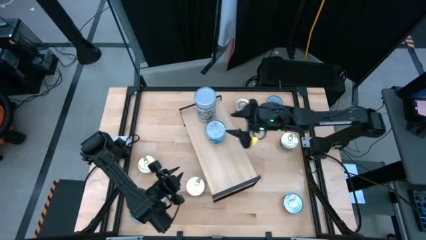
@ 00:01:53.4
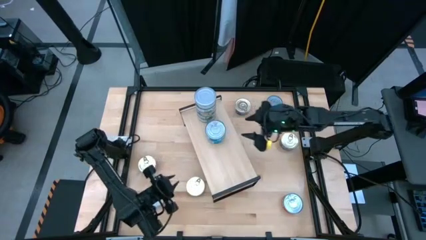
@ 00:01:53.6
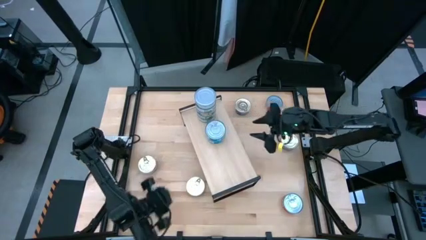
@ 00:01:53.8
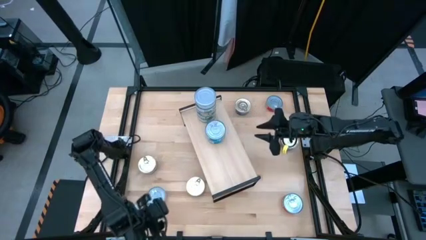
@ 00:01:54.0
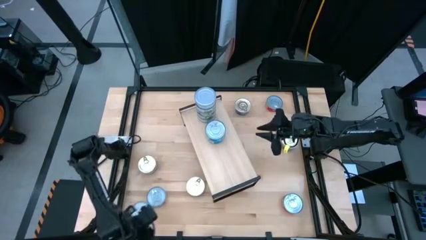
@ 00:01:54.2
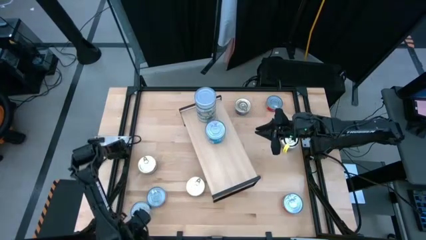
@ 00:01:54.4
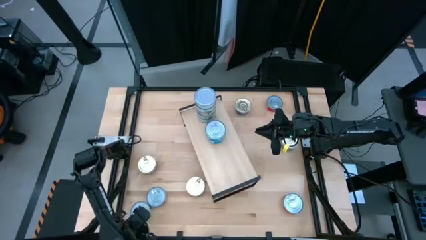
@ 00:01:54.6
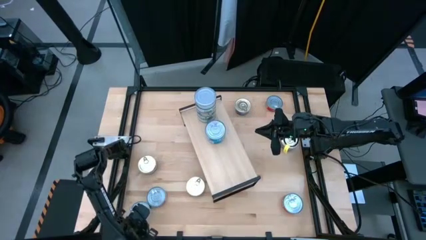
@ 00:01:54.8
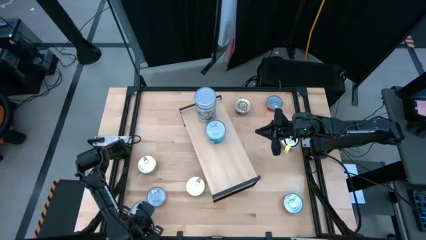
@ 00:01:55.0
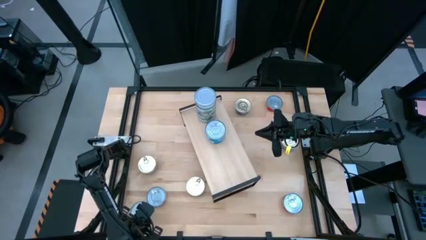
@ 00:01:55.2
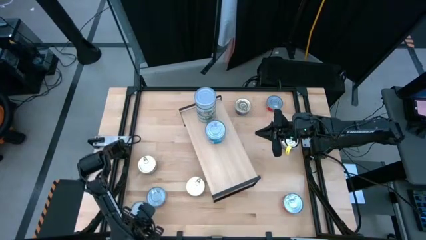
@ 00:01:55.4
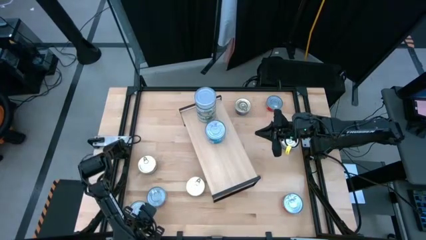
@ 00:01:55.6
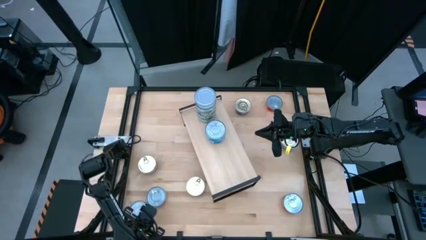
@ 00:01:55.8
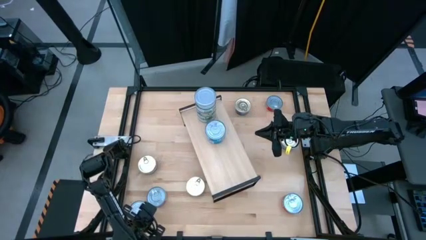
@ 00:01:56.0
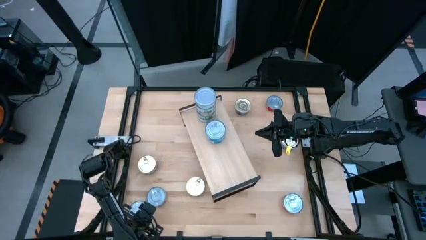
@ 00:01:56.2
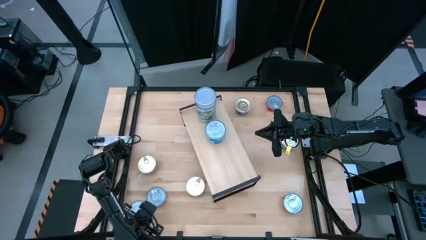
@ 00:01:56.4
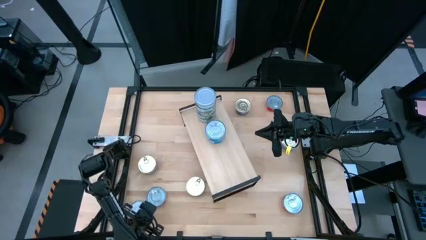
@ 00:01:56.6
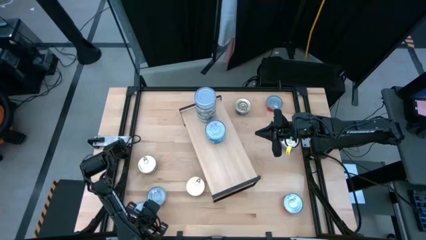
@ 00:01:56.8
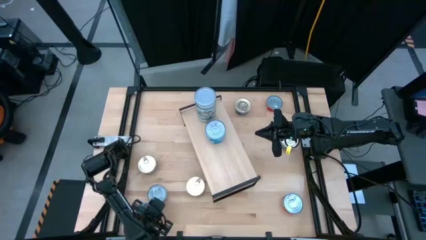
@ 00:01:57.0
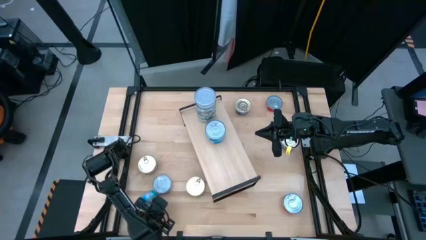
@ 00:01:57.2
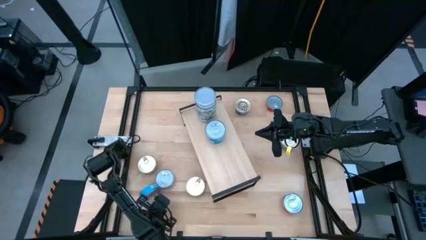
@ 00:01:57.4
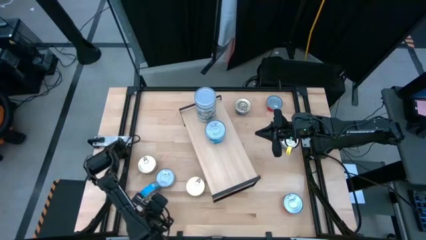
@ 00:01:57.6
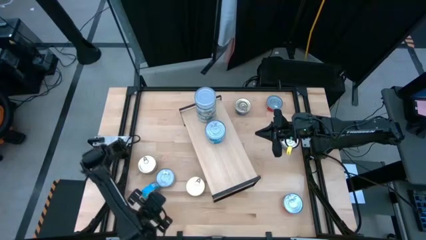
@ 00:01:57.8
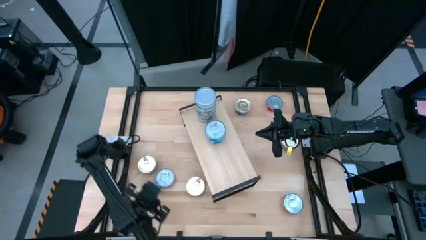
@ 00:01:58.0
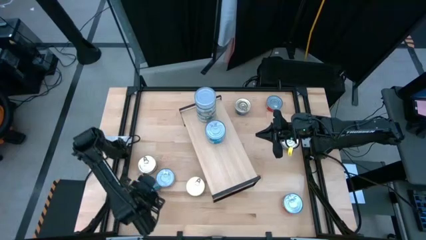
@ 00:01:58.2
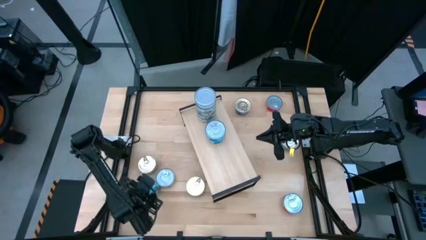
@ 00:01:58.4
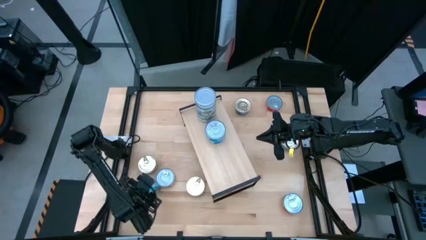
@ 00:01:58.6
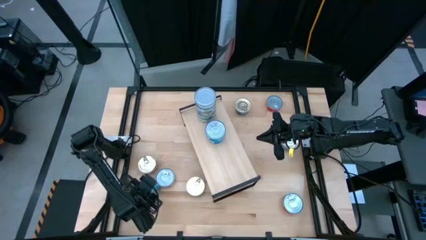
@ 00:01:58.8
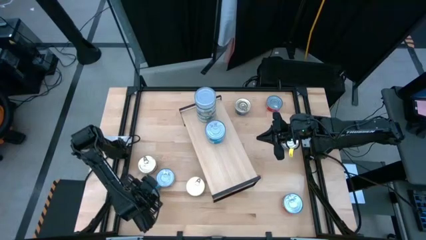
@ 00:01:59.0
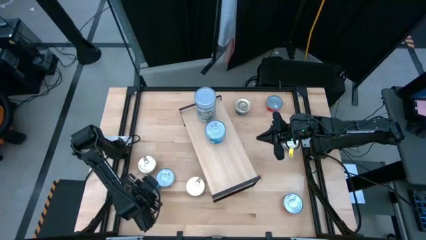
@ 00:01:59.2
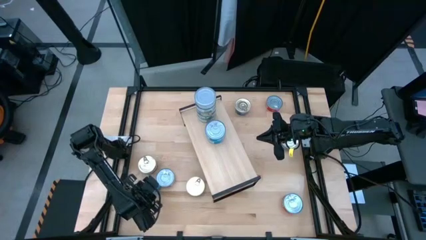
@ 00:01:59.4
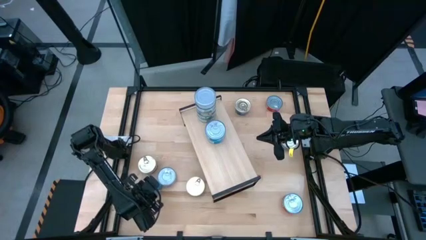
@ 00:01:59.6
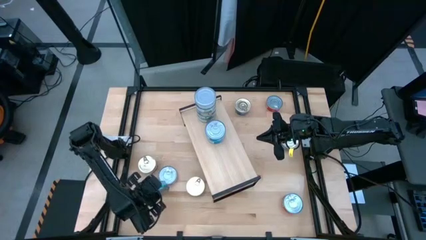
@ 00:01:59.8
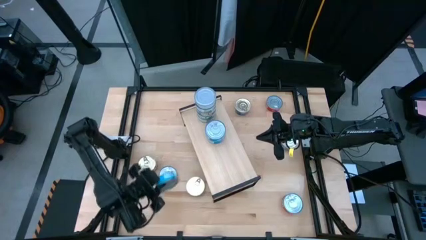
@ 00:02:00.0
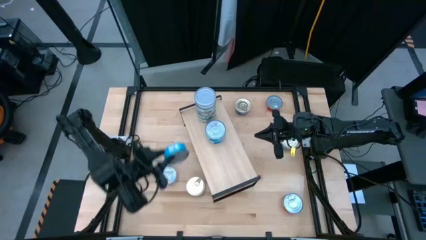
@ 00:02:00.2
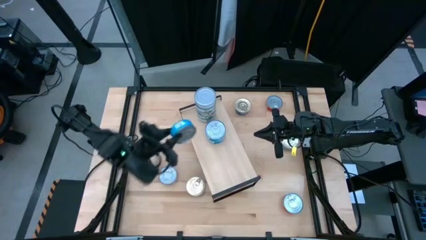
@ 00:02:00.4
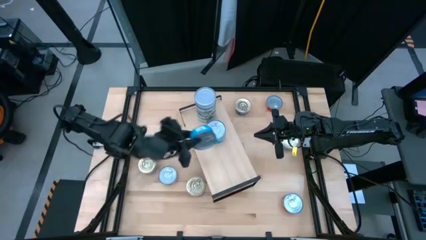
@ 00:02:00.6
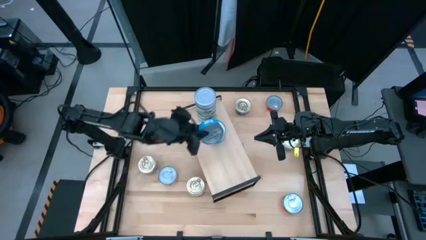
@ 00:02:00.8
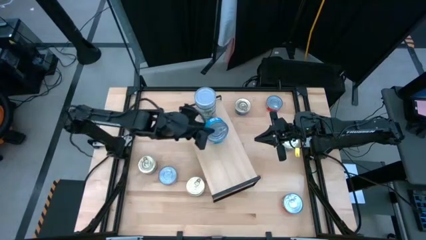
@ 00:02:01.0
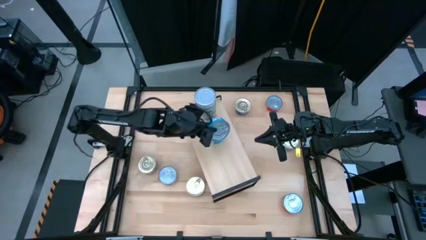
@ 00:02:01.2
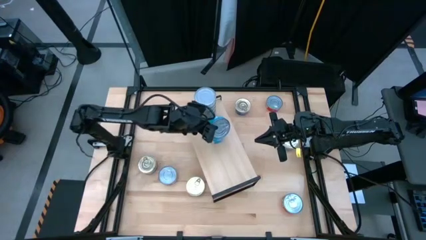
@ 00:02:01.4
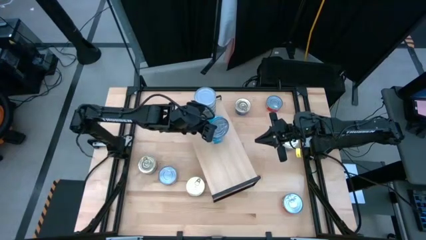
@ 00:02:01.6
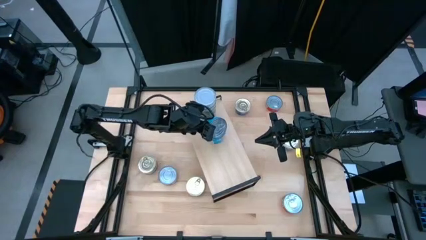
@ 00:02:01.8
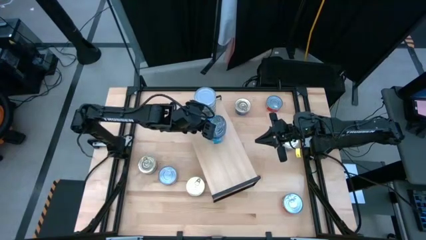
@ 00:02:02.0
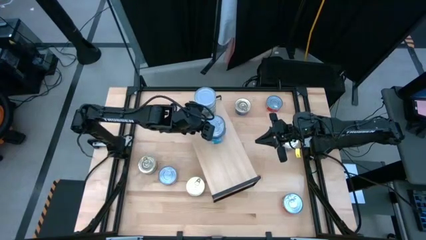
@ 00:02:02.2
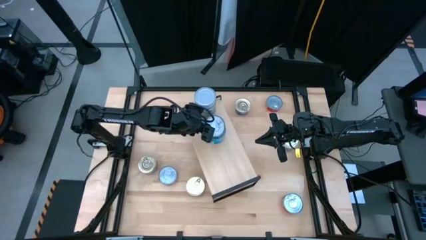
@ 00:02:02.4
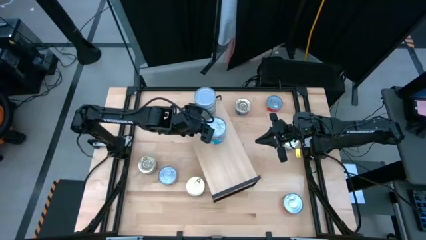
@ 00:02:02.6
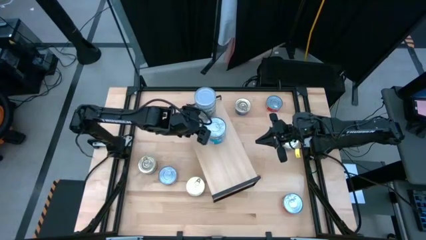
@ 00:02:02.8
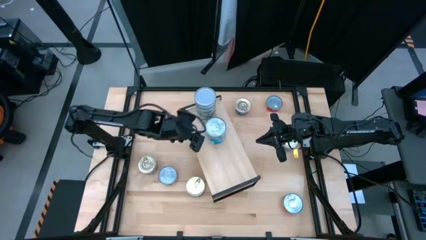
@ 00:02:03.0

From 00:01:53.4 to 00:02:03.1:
Task: Stack canned seafood by type on shelf
Stack the bottom left light blue tuna can on top of the other light blue tuna can on the shelf
